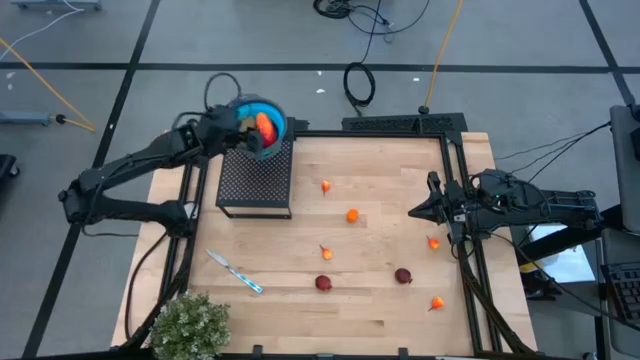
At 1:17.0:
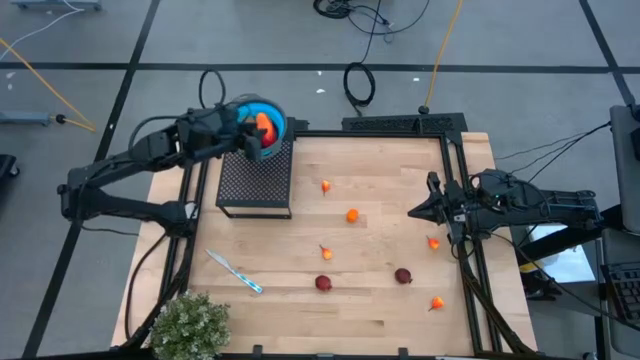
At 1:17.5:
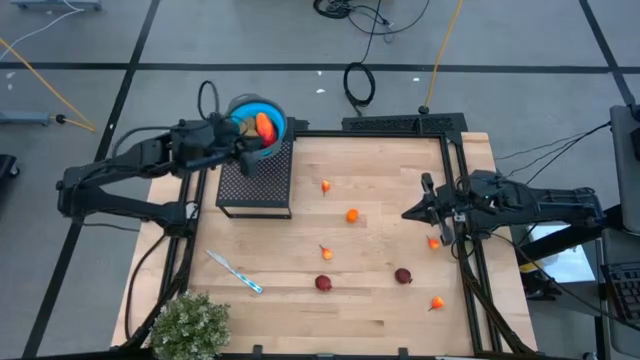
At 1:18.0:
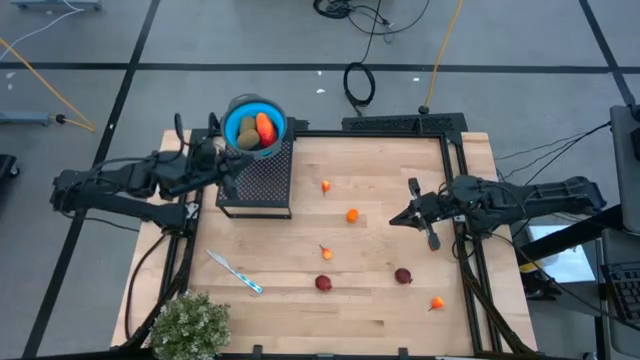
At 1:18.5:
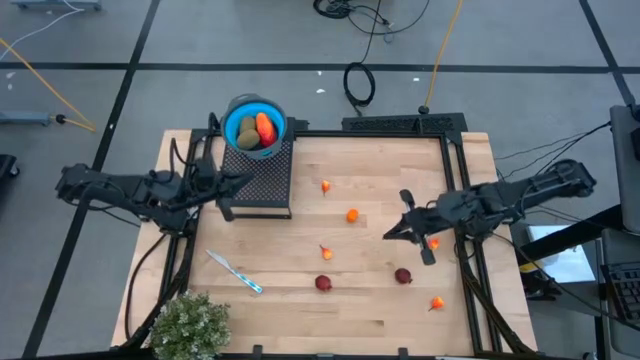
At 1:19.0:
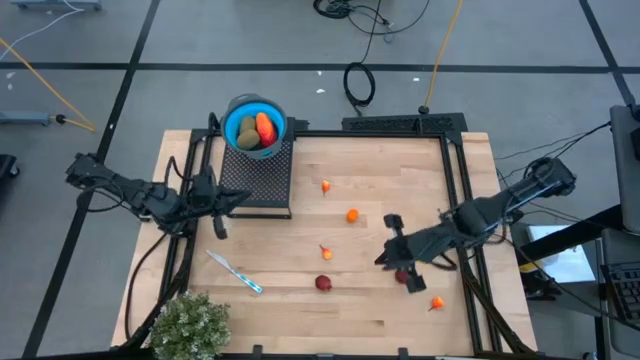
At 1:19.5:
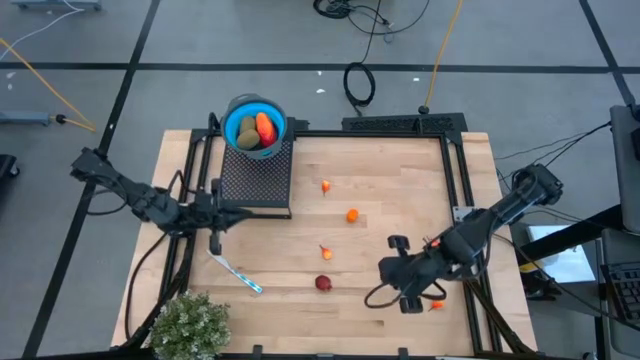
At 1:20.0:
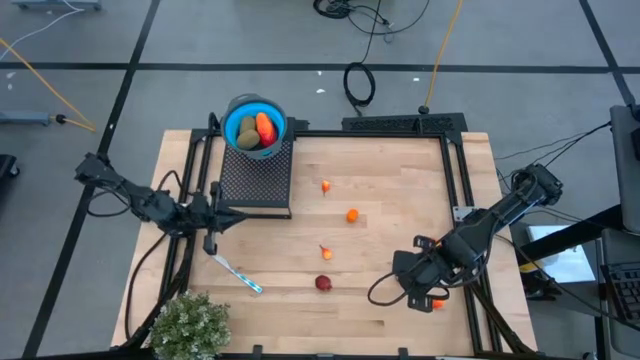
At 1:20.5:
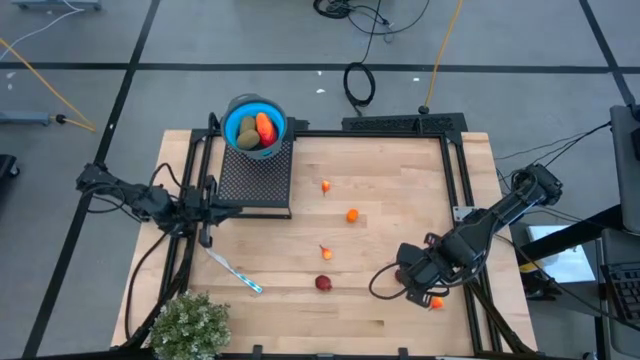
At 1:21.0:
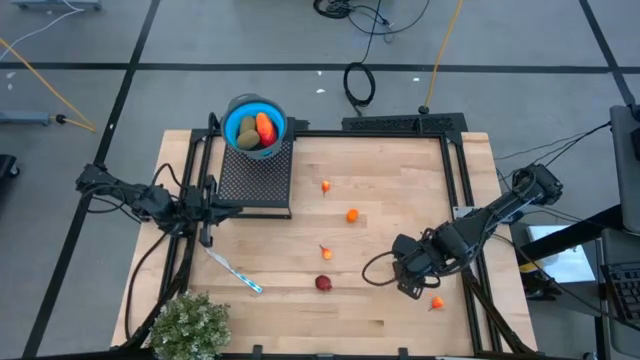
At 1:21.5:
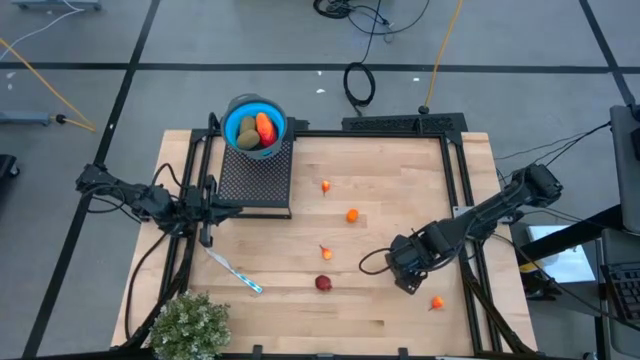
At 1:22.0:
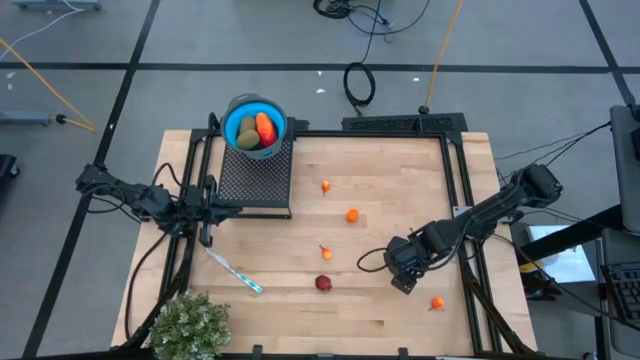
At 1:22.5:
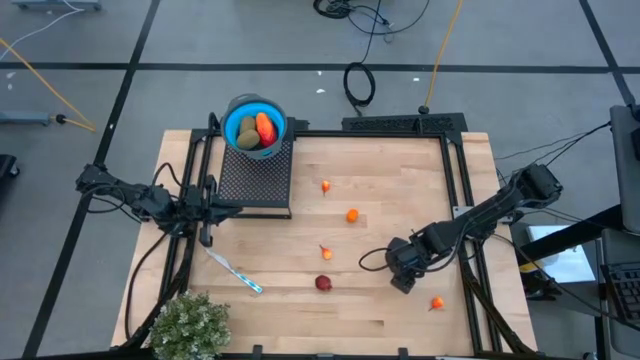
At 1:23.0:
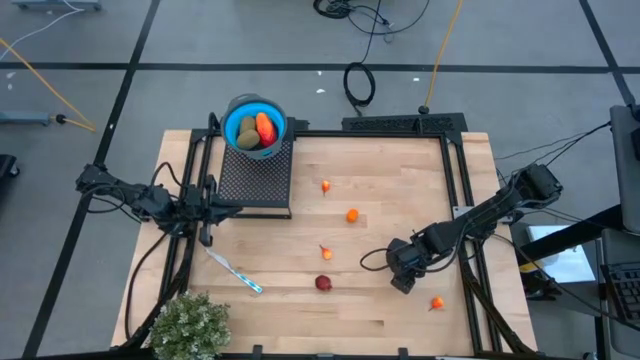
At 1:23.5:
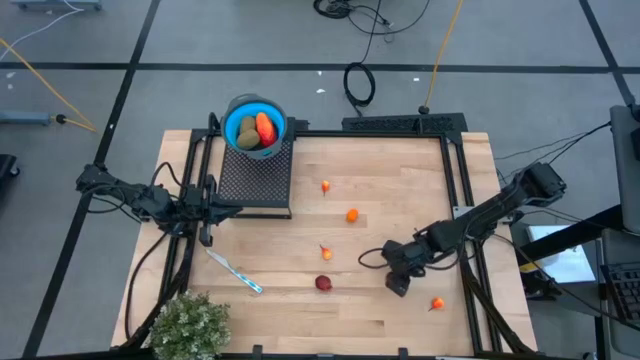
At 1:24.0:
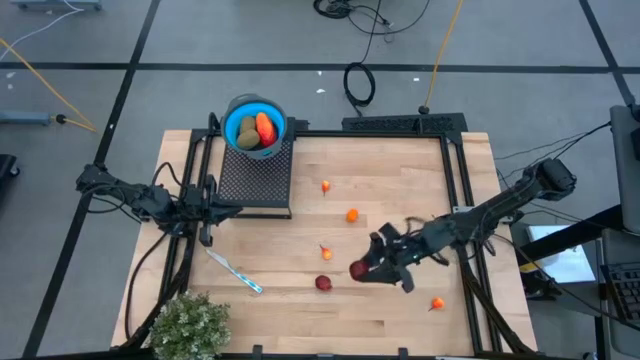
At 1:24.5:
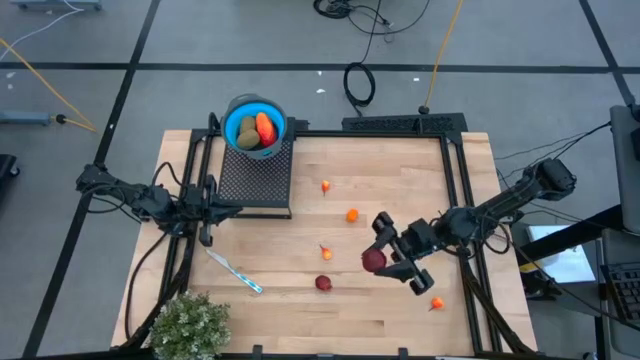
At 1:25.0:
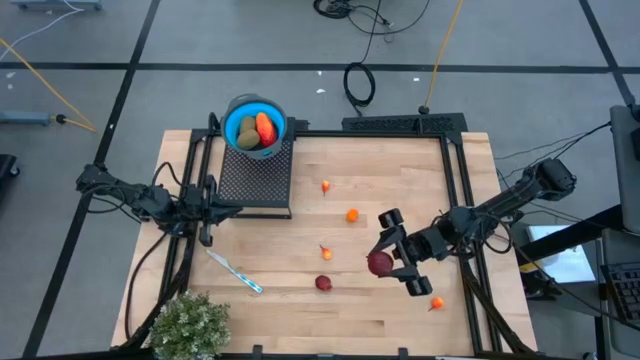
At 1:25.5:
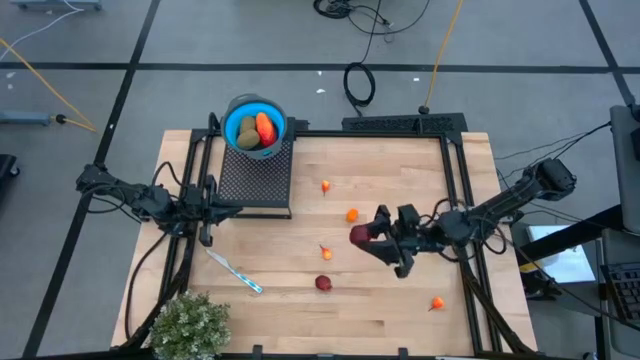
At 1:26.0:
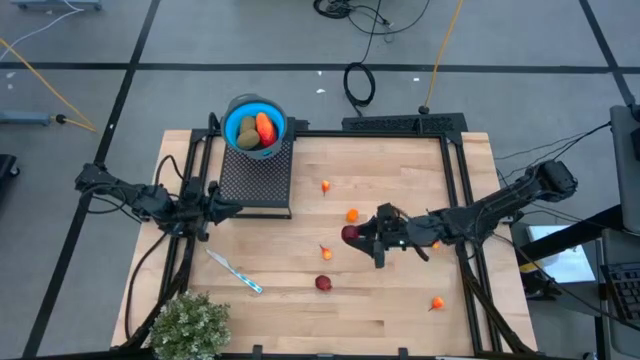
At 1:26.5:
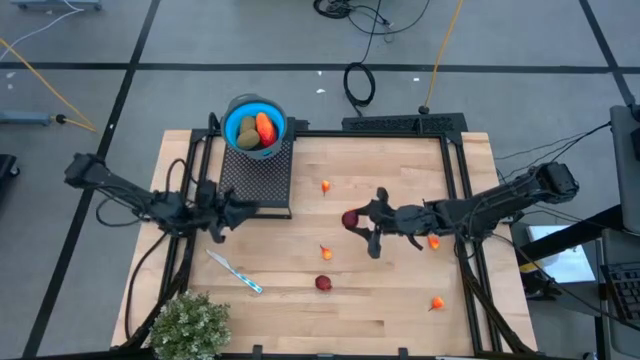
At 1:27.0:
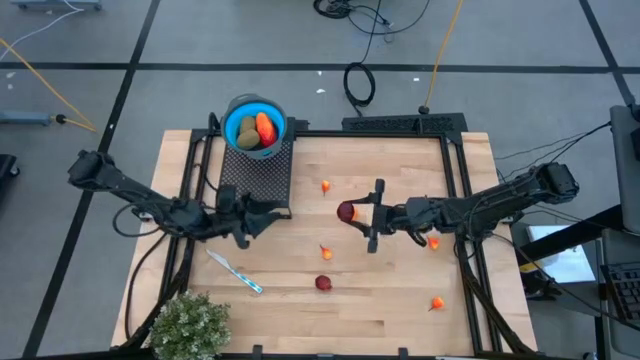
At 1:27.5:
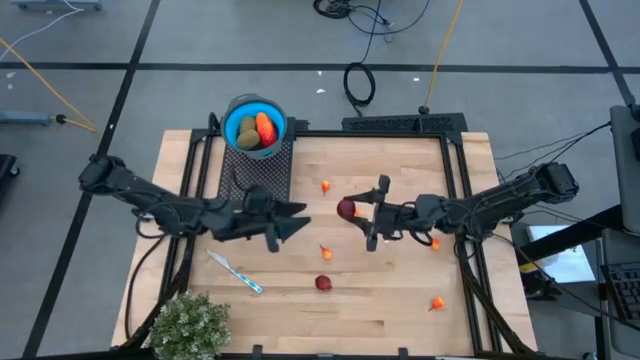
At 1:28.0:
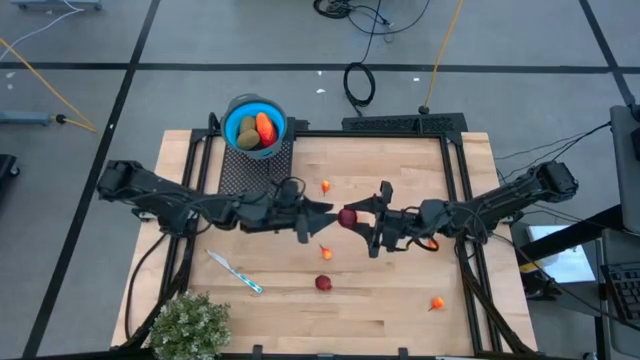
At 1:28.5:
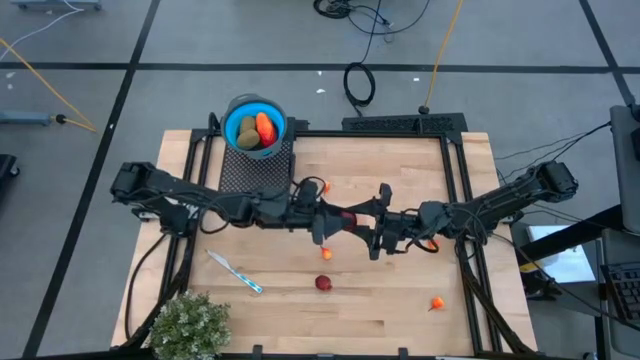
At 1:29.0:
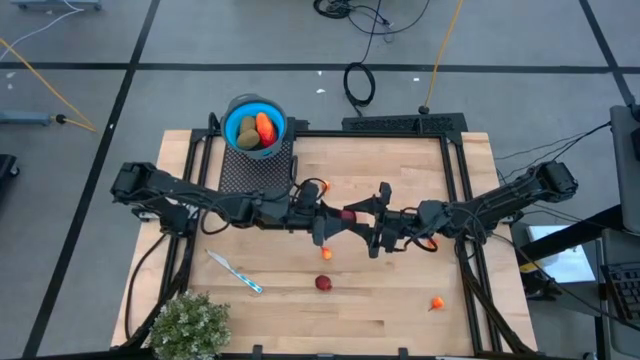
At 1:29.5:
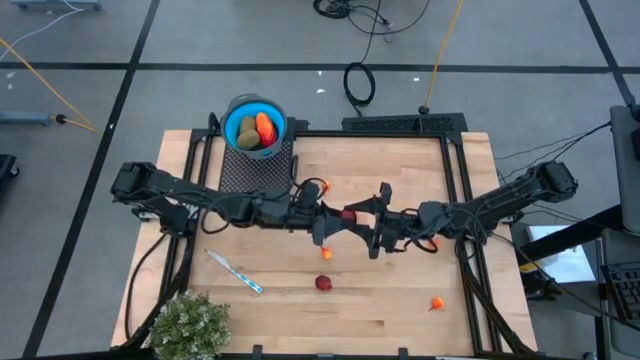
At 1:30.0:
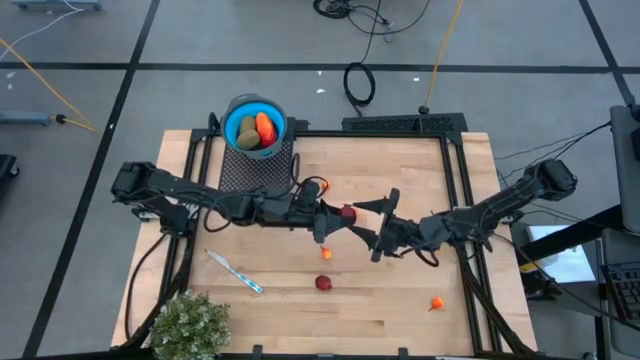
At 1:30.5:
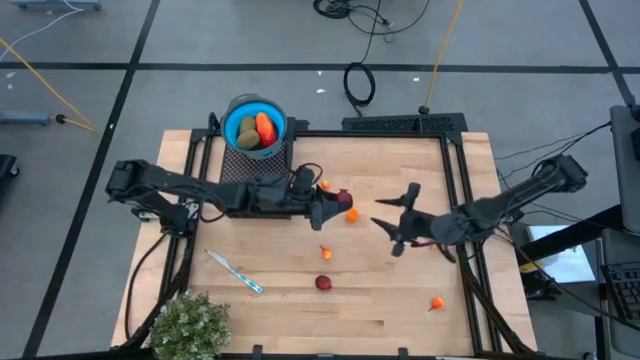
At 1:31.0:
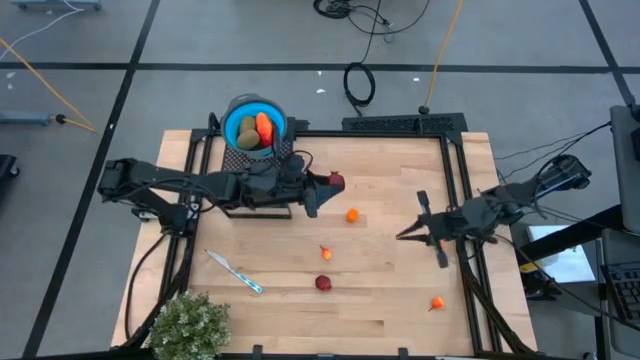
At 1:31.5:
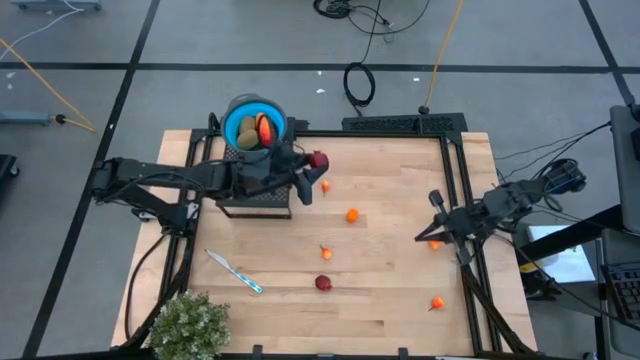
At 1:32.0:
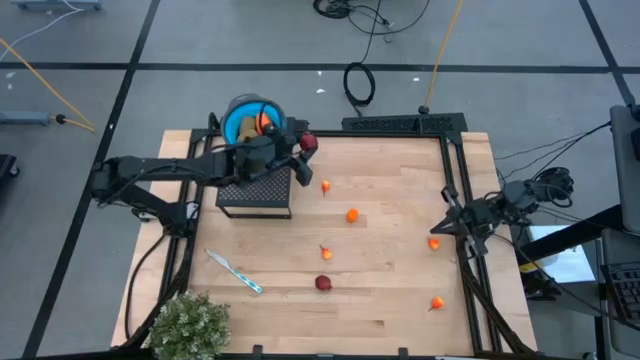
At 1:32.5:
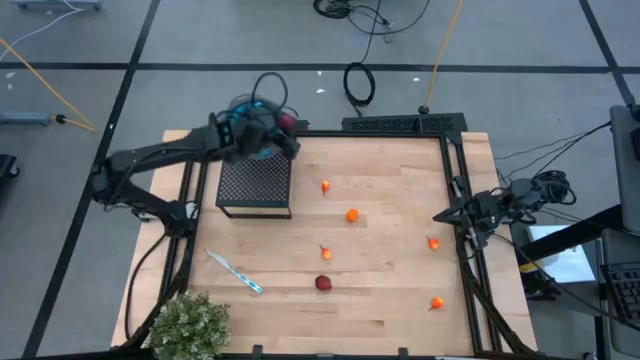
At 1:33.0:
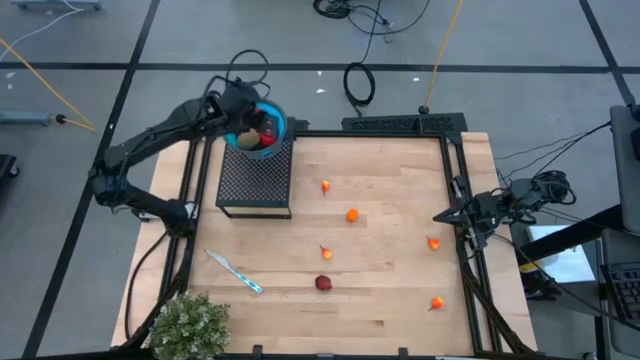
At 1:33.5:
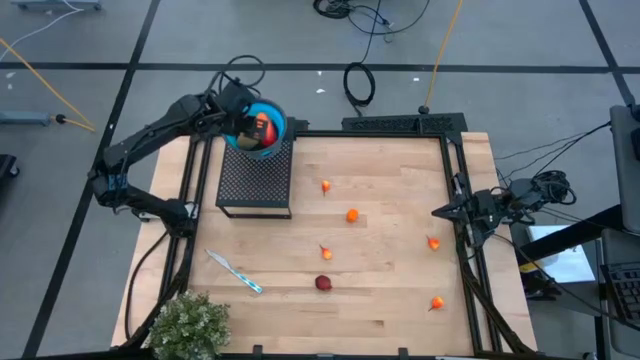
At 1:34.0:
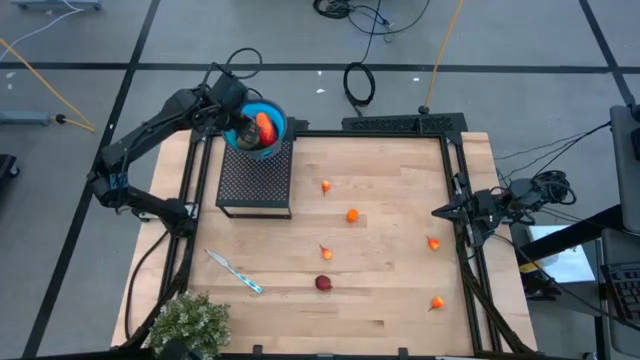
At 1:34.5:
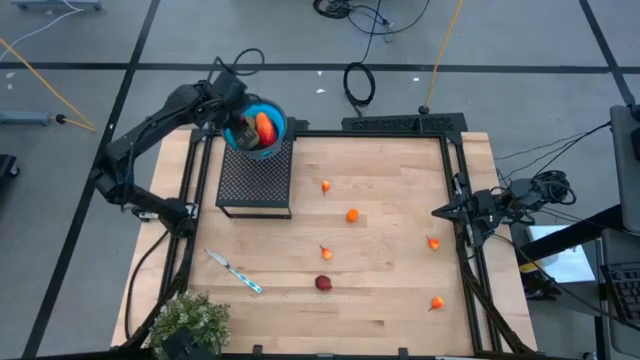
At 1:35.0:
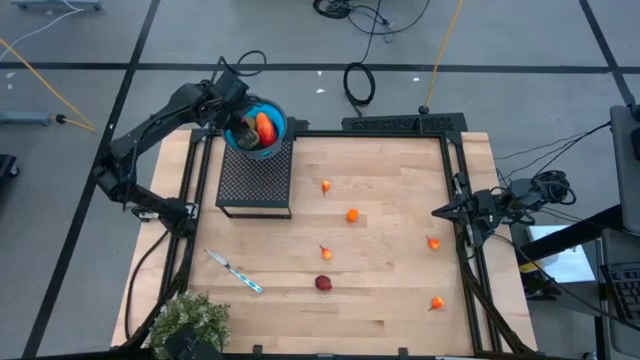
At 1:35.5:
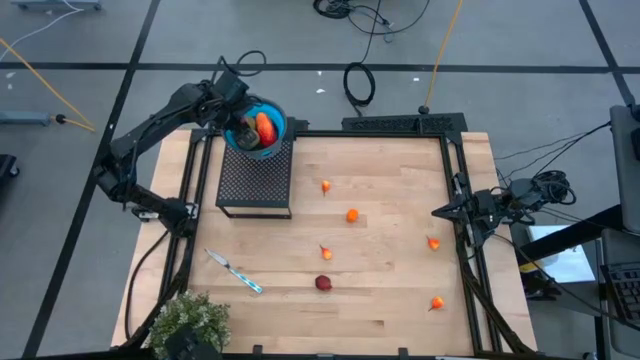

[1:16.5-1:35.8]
Task: Pick & Place Fruit
Put the pomegranate into the blue strainer bowl on the shelf

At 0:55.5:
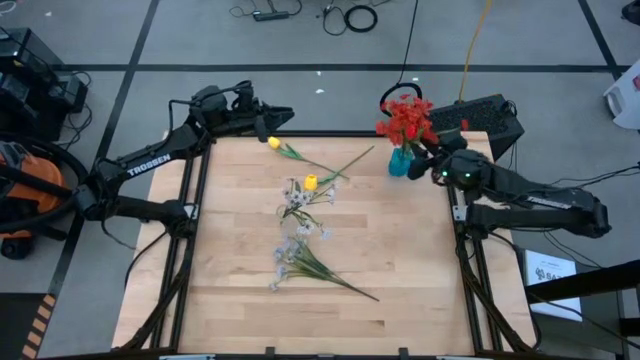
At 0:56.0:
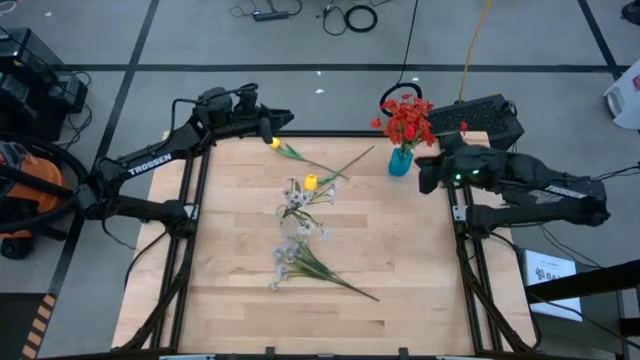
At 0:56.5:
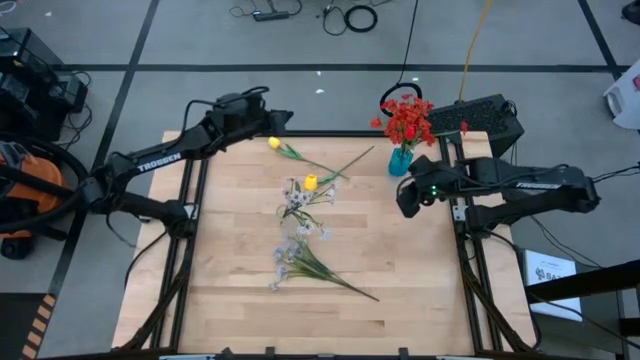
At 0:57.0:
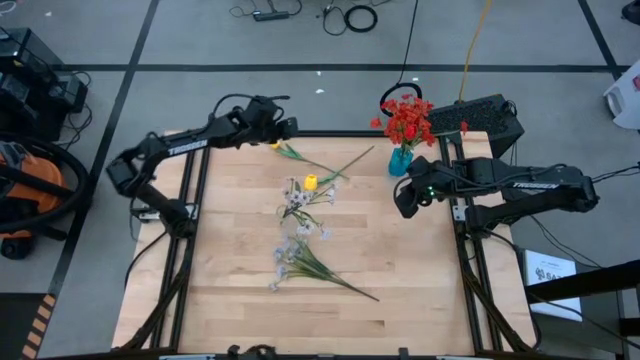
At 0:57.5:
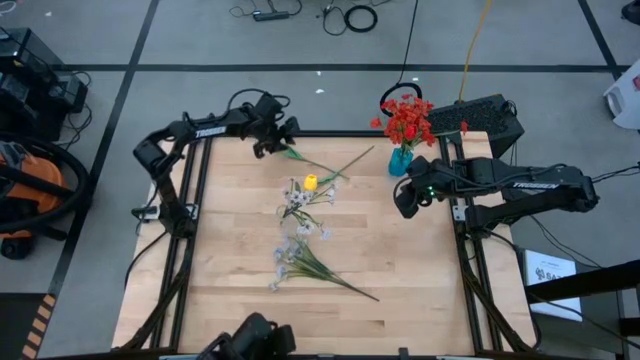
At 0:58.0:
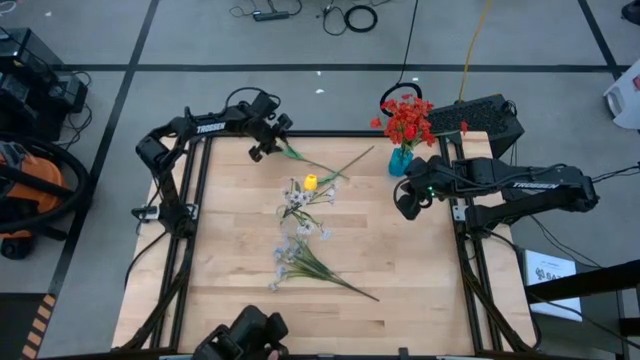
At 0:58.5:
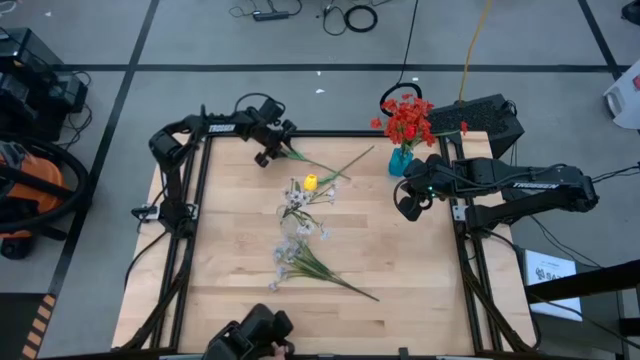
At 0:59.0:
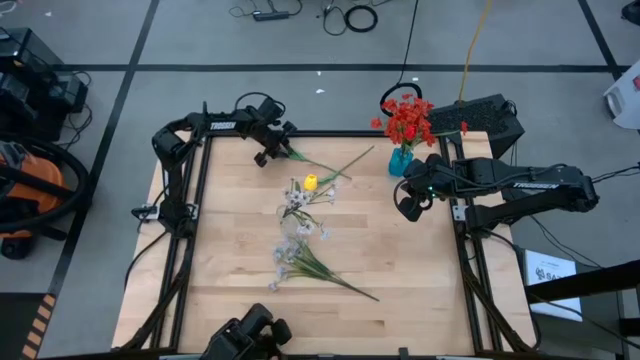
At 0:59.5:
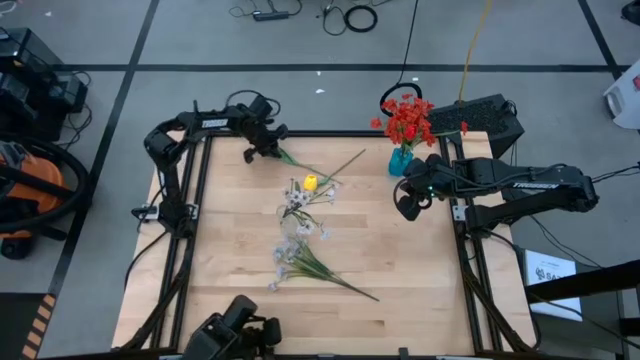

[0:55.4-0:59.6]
Task: Sort flowers into vase by color
Put the yellow flower into the transparent flower vase
